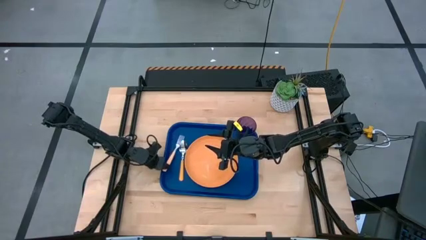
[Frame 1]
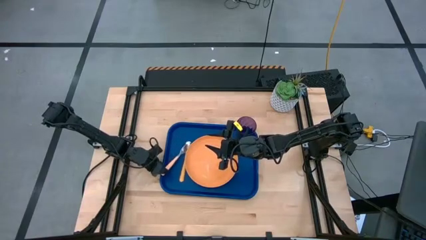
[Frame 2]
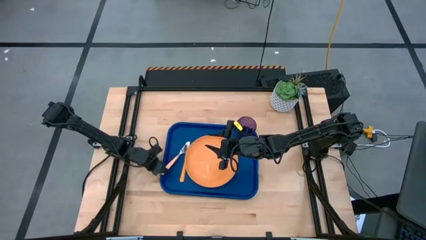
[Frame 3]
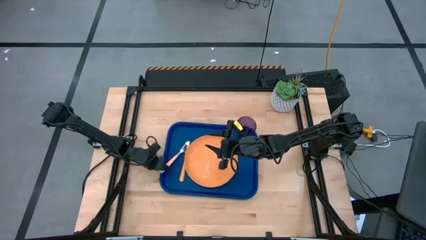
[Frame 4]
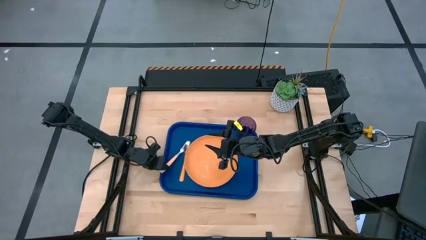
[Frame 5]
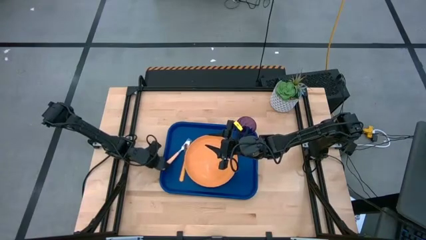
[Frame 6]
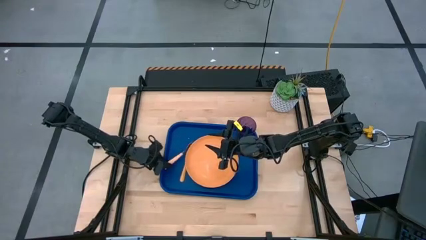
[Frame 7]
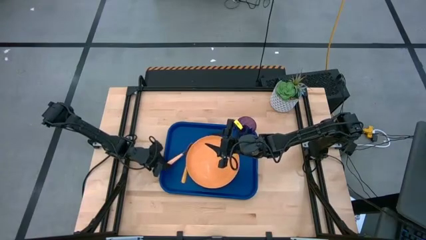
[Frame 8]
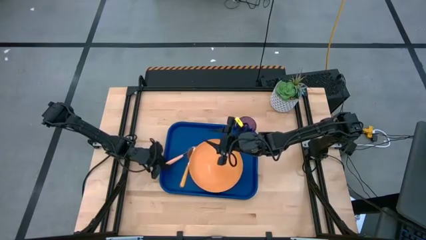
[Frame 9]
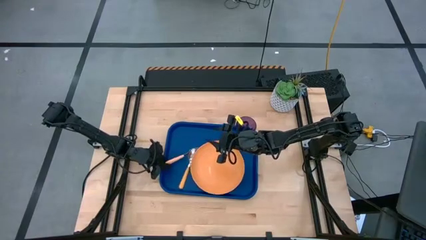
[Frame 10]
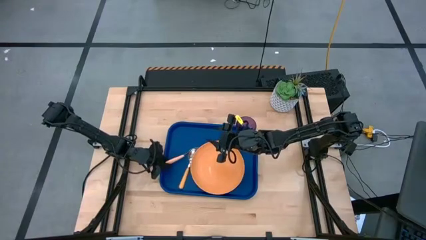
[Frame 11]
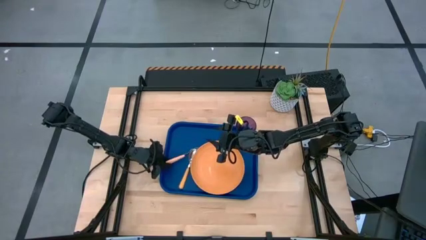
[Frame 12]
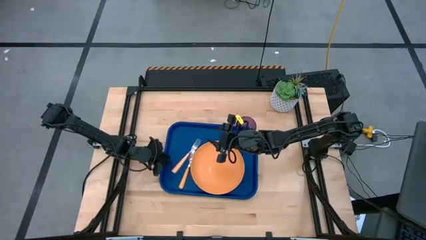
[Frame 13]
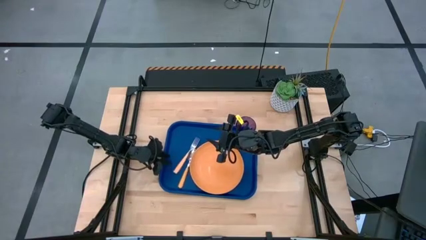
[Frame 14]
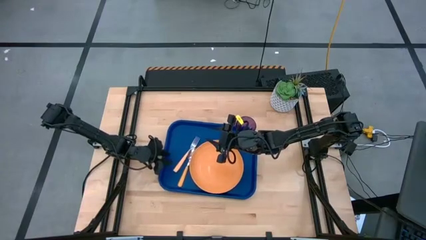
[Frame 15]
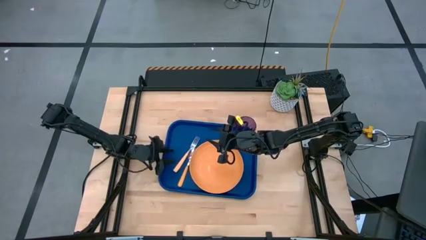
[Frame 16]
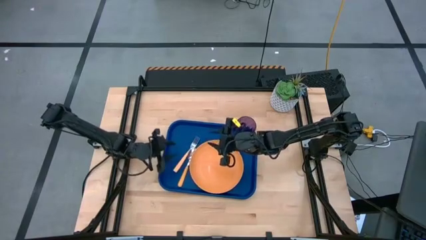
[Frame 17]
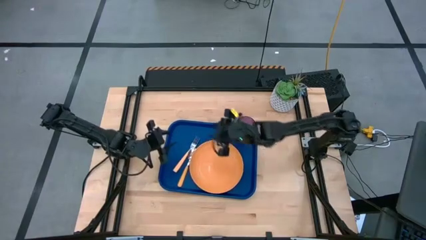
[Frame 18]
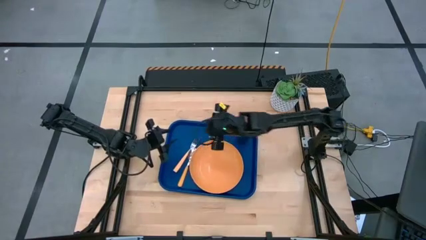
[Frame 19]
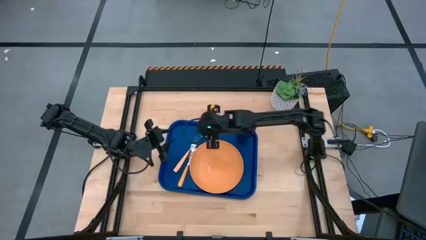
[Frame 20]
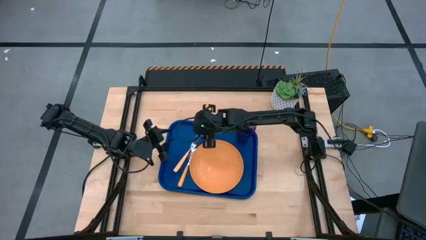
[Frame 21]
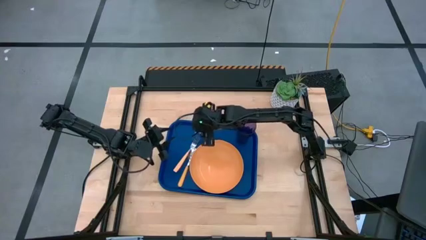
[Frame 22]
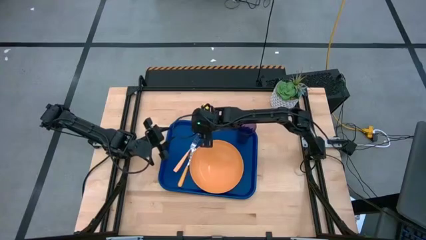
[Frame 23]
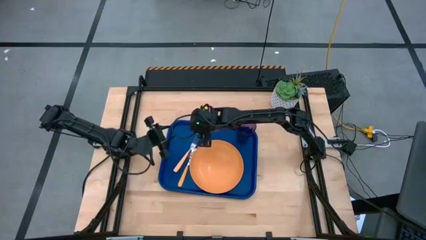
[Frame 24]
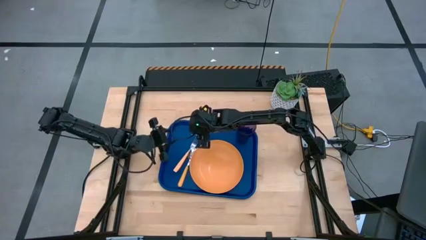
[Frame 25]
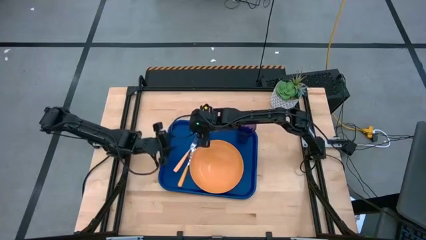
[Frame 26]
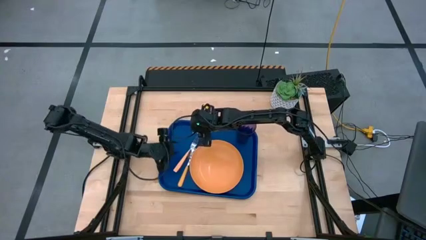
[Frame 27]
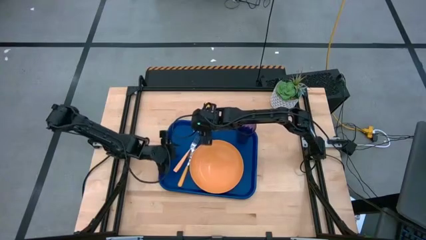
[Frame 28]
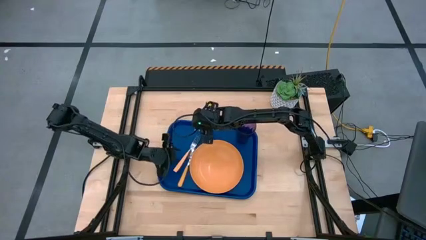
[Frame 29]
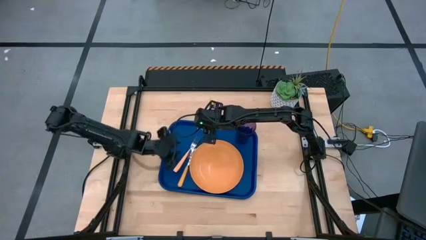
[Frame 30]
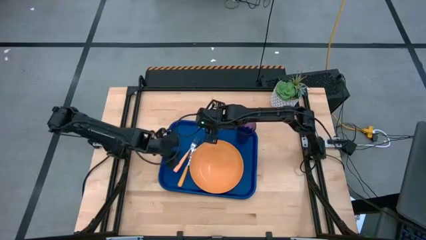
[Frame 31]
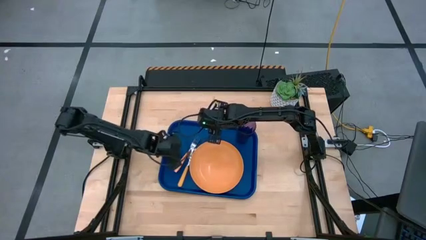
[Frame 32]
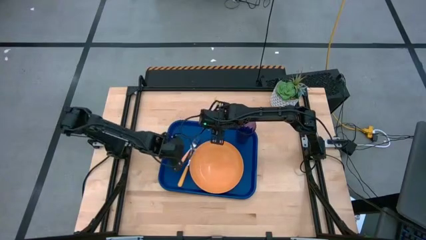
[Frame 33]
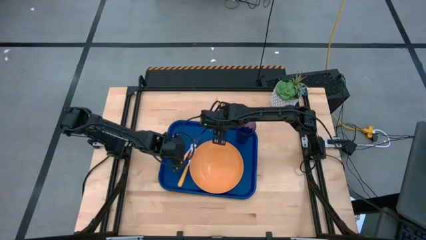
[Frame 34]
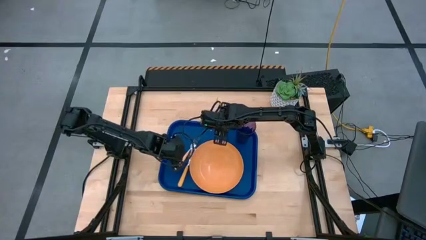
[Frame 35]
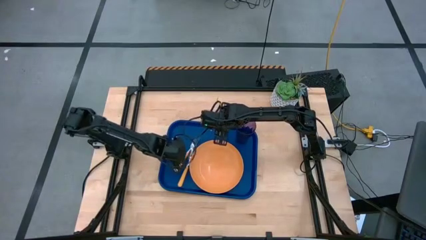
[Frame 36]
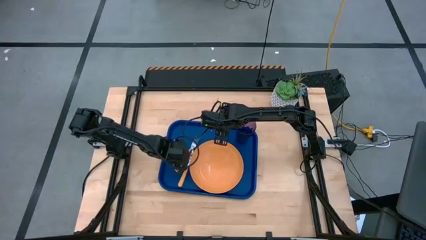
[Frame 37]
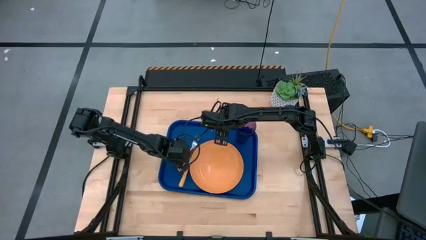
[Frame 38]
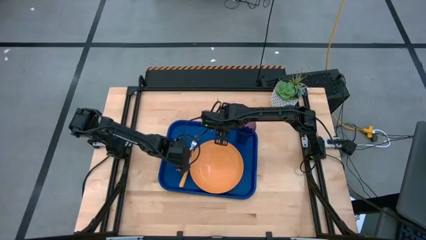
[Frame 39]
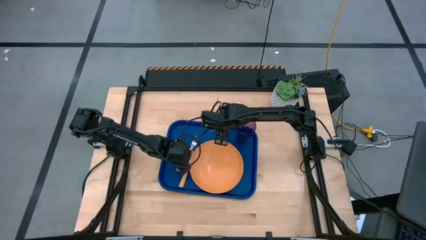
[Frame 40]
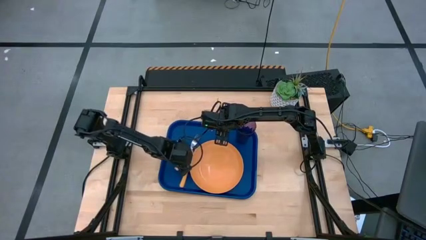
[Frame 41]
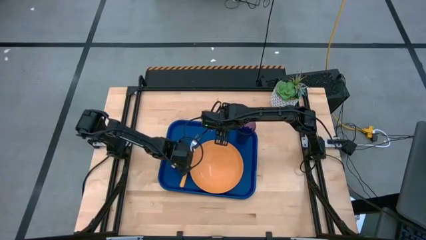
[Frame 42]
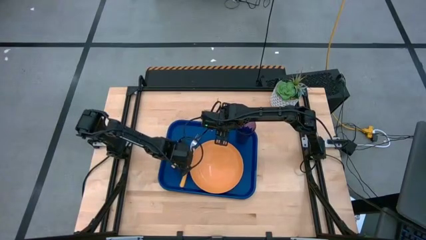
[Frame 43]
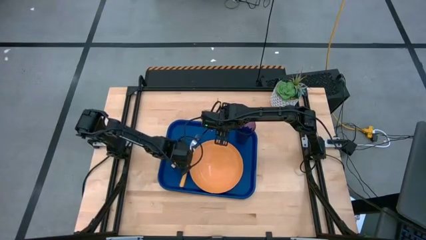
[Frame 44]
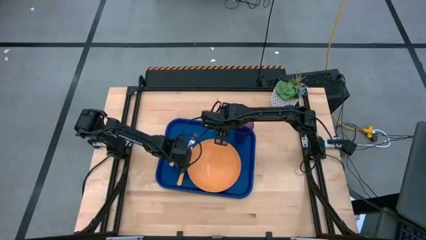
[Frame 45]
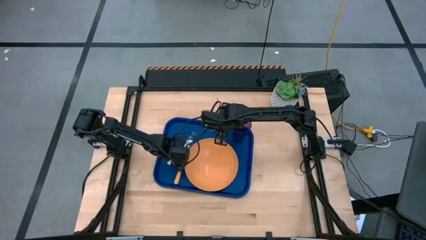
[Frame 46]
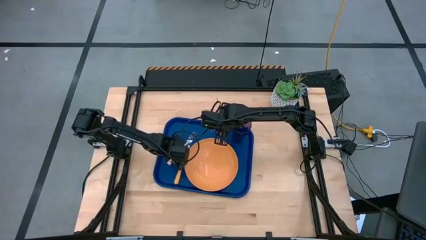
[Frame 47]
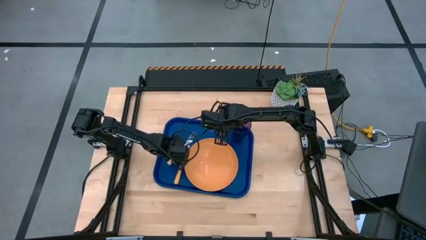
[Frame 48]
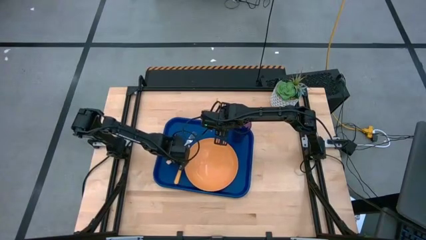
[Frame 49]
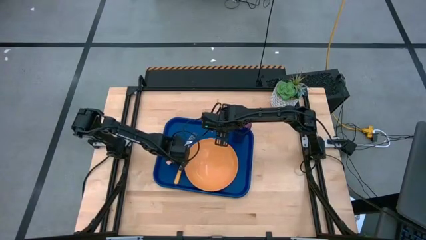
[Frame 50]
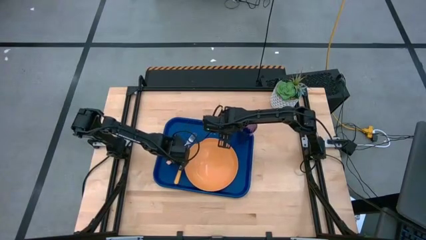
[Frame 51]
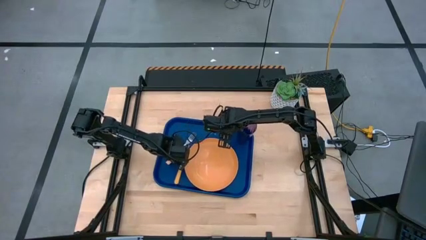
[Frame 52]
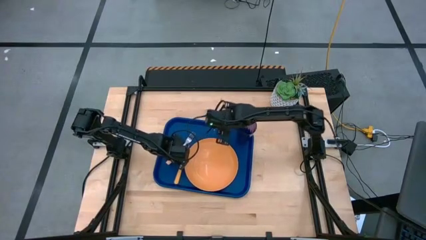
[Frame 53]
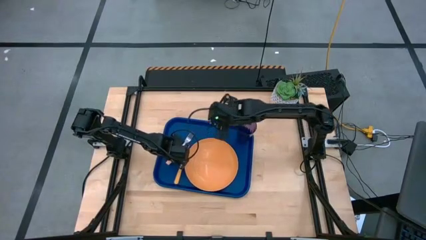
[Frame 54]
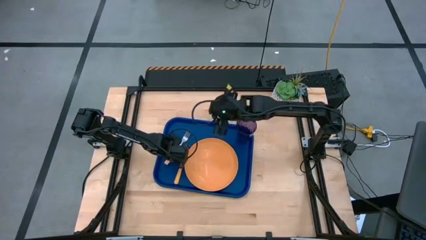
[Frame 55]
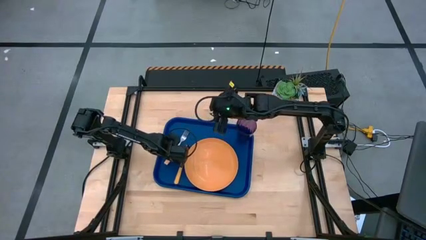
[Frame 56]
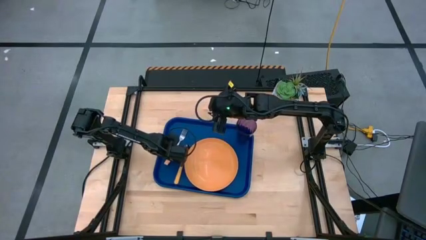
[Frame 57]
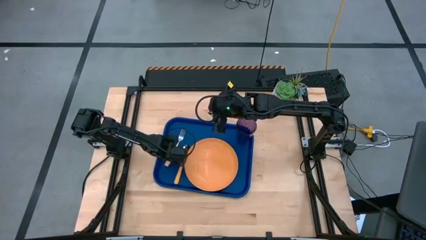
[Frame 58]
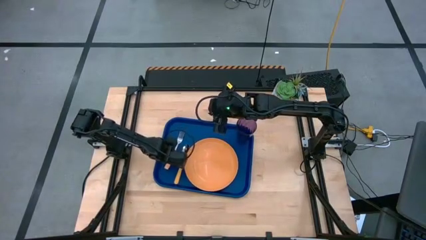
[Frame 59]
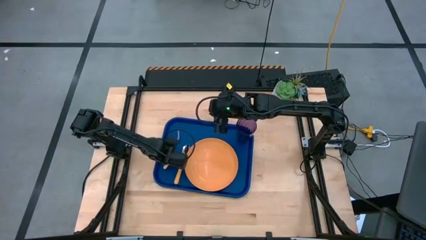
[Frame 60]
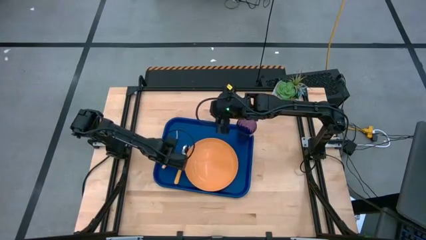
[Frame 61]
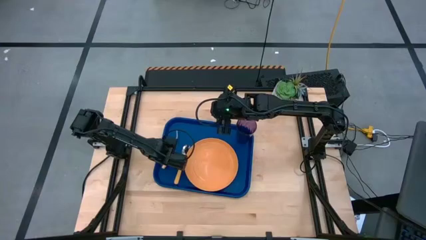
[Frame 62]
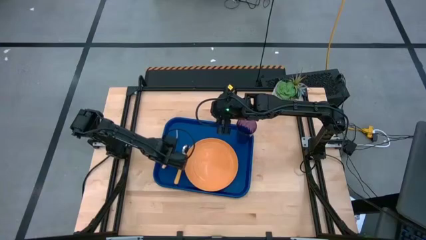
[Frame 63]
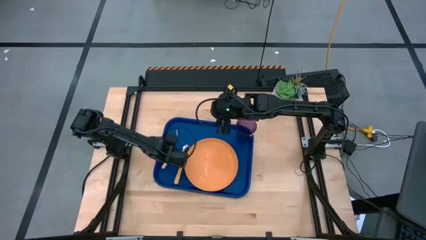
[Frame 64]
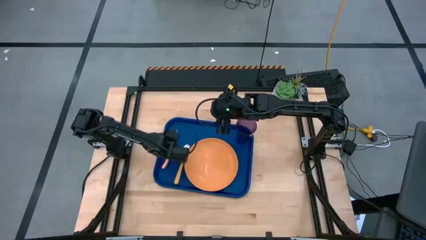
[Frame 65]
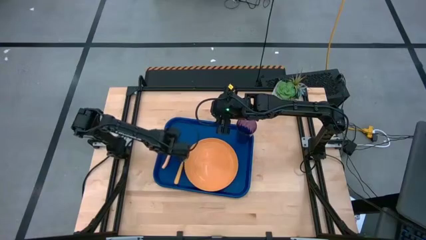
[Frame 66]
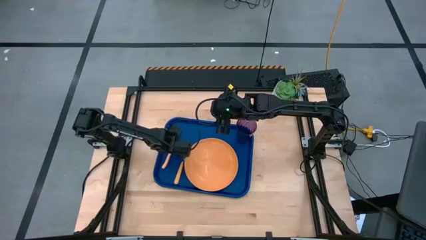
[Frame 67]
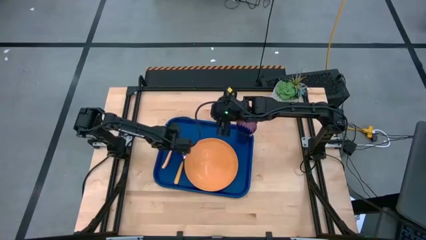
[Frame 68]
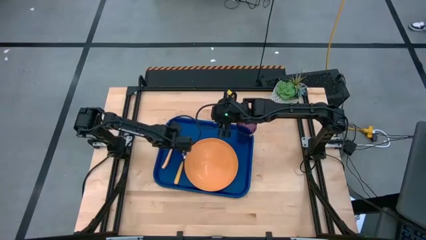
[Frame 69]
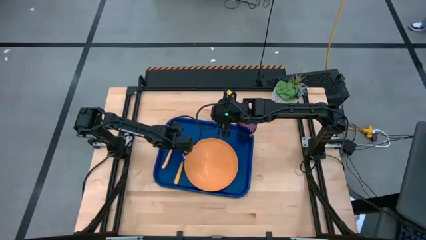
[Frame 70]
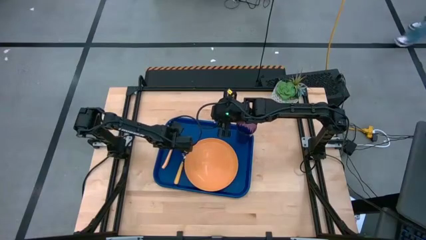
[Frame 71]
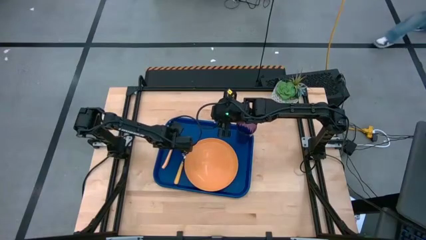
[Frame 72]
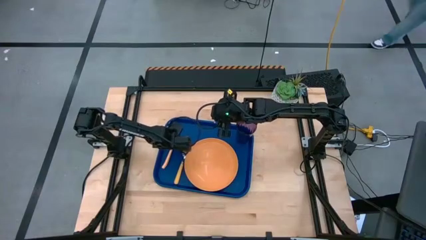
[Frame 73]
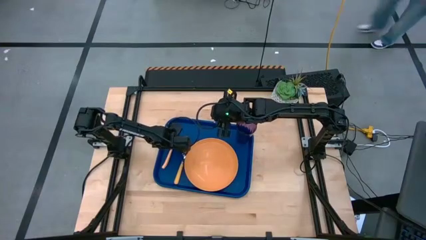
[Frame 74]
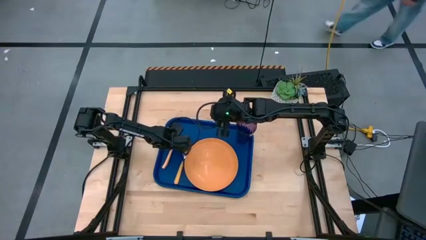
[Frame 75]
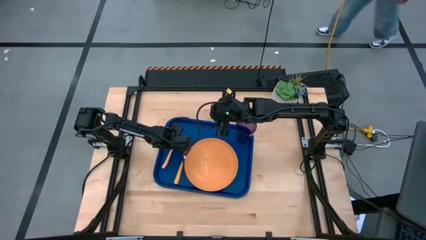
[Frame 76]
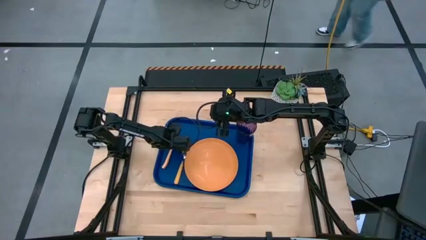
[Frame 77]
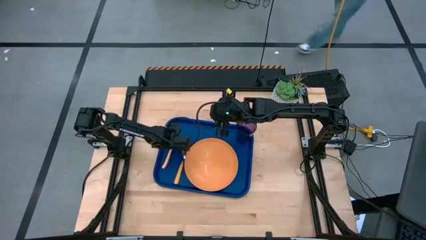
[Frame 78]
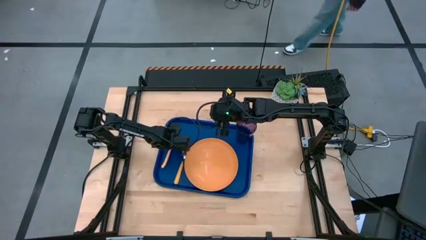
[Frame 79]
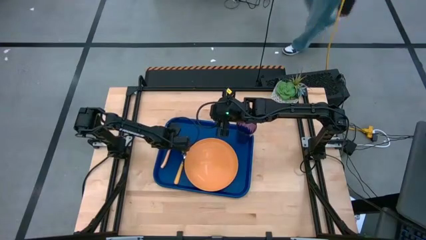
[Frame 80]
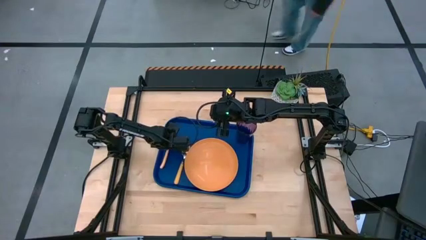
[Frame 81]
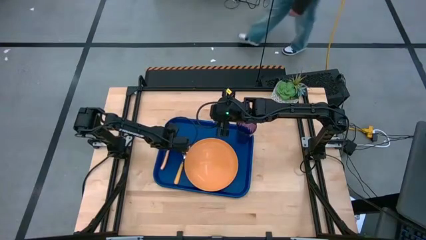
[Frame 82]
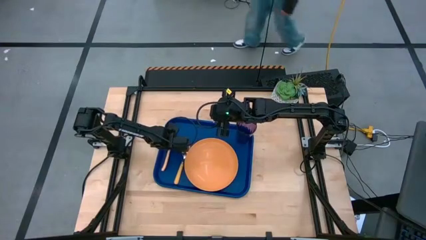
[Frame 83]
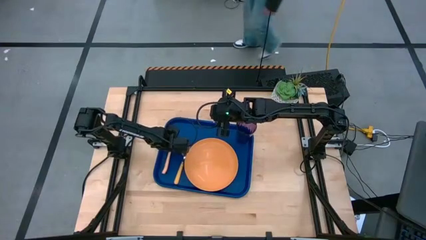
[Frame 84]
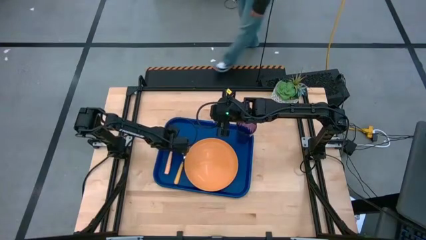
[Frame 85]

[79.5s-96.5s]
Task: Pick and place plate/cup/fork/spoon on tray
Put the orange fork on the blue serving tray to the left of the yellow spoon
